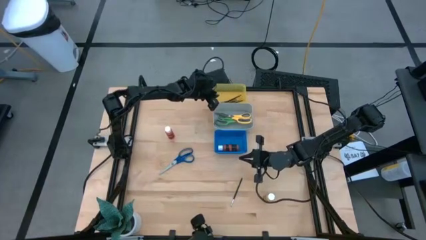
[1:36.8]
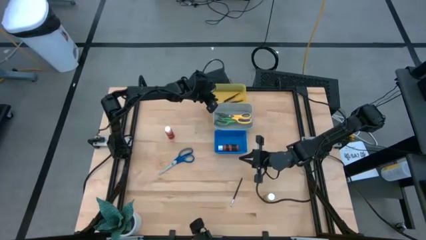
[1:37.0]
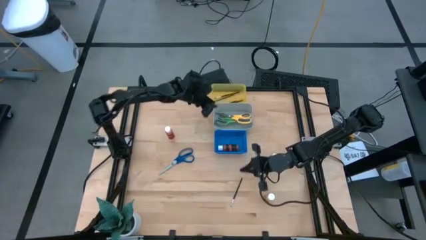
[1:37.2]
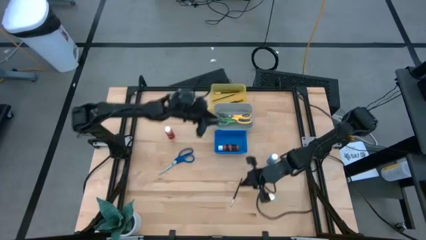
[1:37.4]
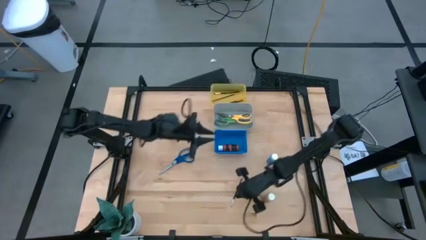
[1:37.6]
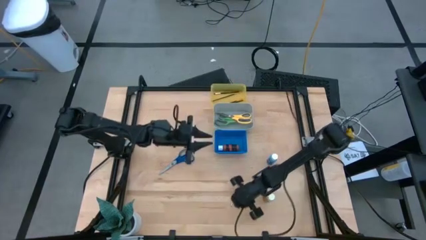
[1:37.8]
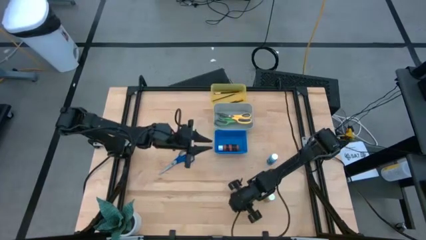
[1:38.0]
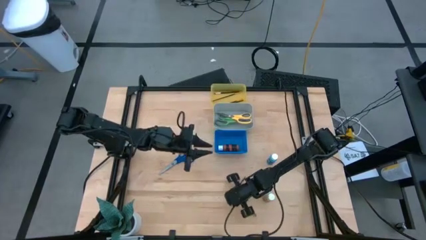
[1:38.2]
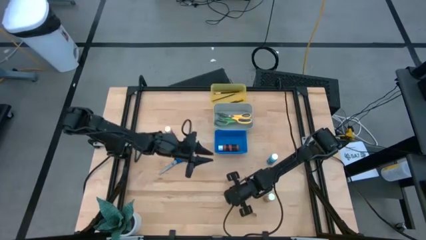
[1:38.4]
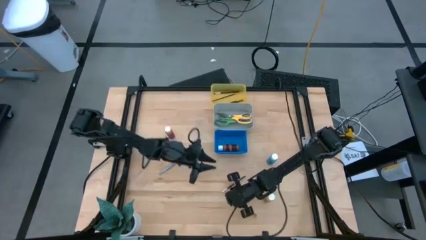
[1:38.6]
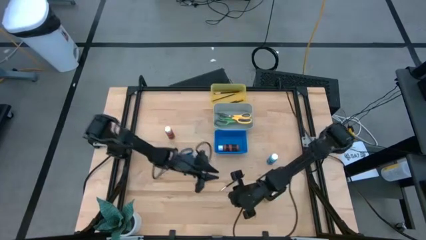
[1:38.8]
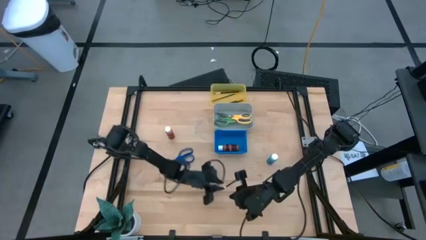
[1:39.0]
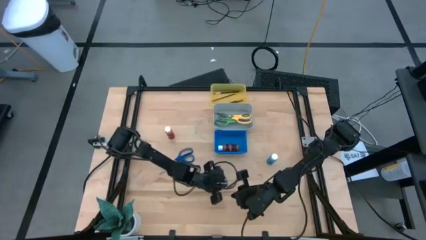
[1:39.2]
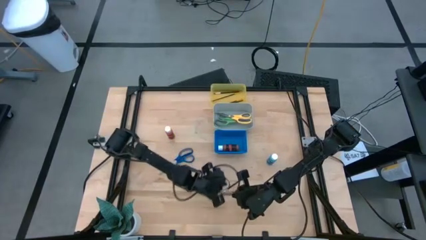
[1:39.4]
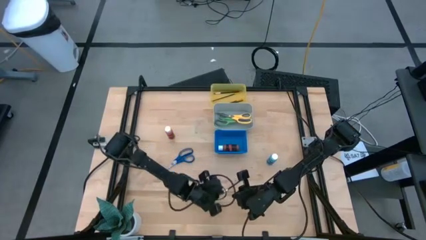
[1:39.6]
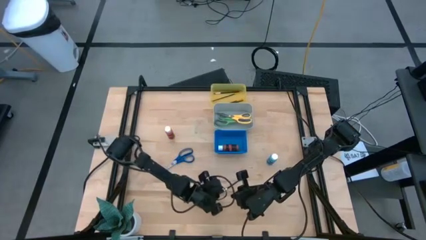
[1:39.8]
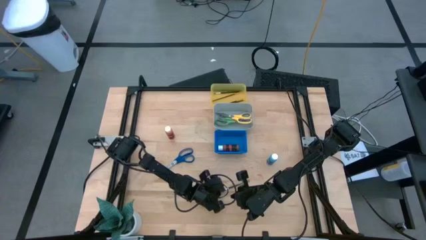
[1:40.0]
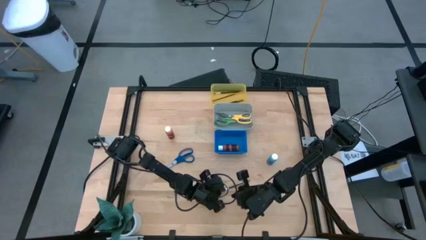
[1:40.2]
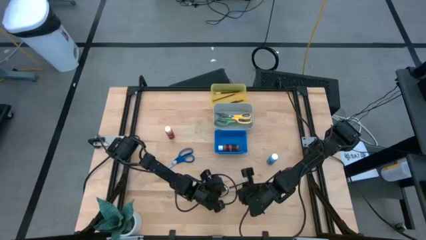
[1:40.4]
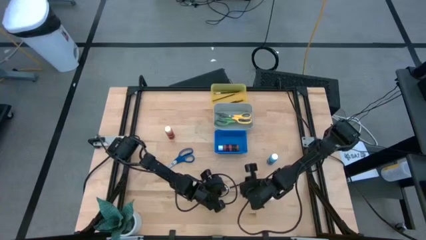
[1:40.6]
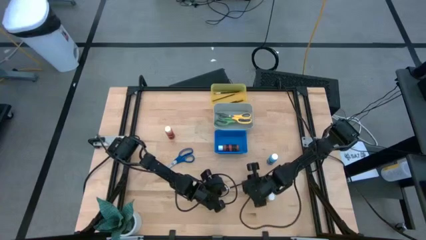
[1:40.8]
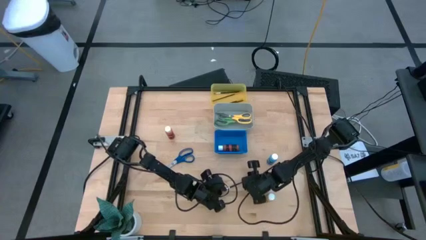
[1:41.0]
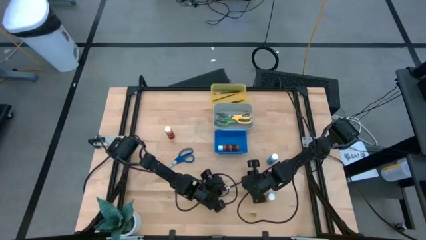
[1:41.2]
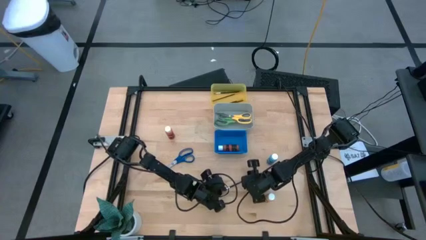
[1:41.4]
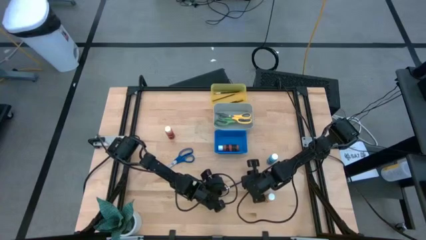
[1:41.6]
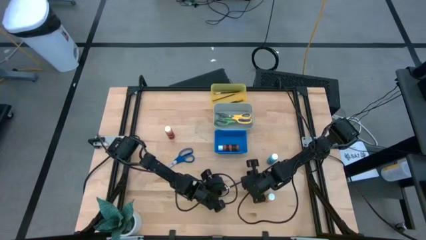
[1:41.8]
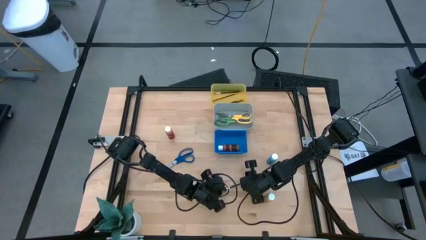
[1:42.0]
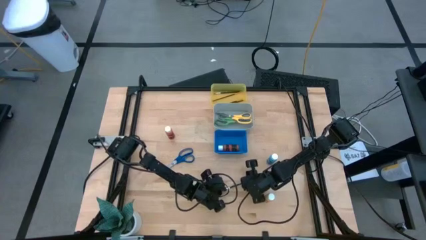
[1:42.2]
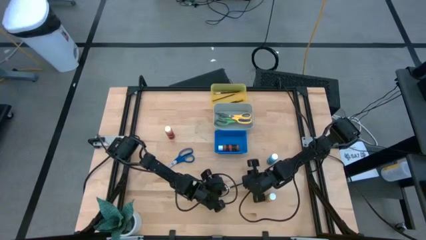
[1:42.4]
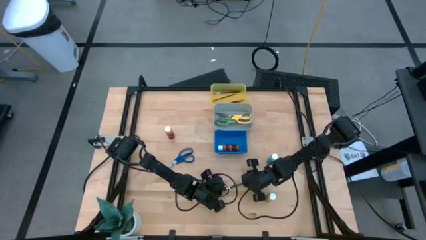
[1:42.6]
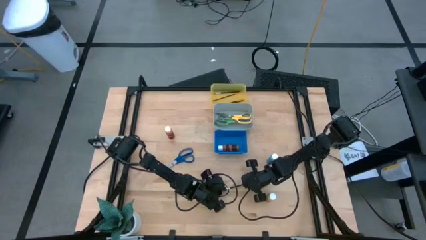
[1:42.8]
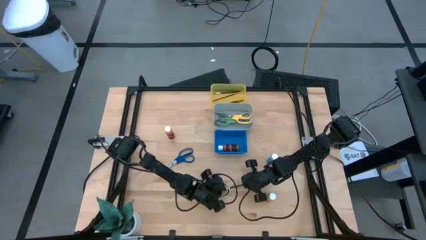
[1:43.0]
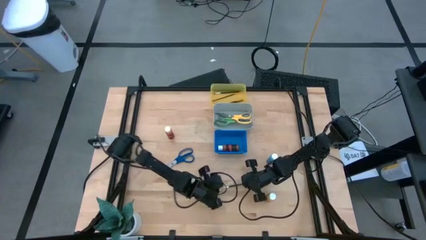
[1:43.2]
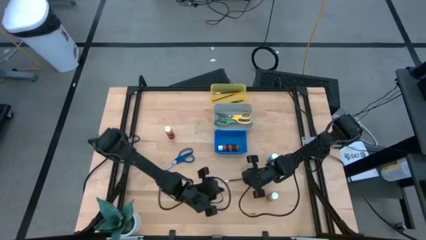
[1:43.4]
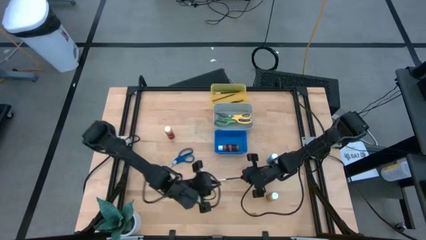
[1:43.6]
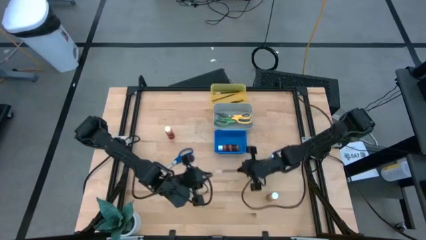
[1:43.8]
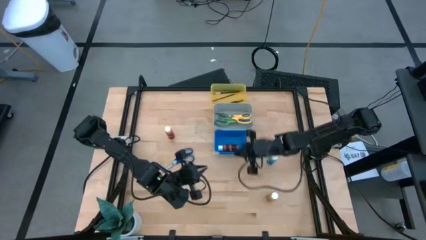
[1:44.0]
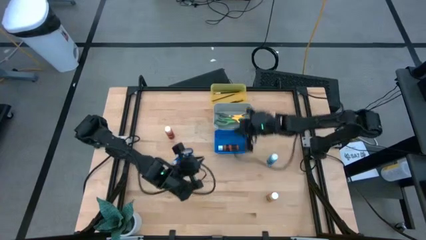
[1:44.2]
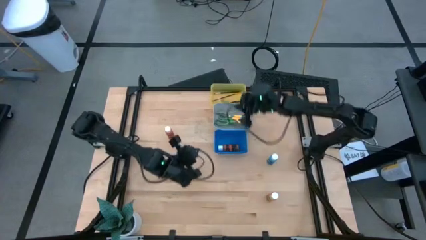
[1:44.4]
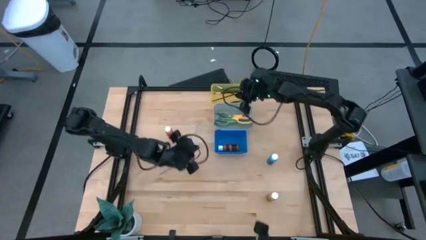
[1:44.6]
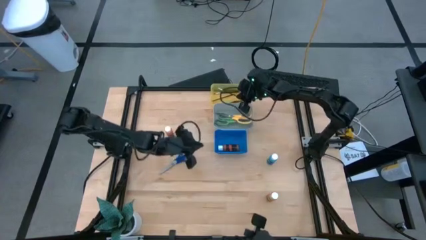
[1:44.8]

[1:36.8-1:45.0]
Task: Pick & Place Paint Supplies
Put the silver paint brush into the yellow bin

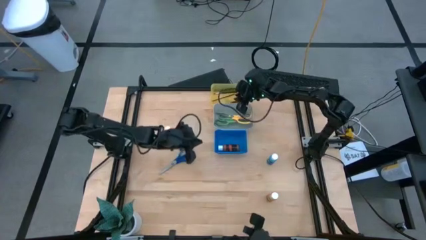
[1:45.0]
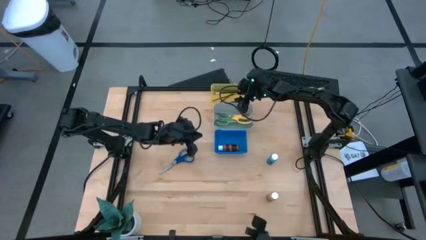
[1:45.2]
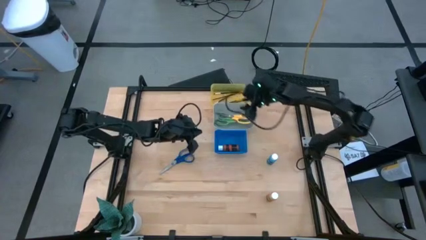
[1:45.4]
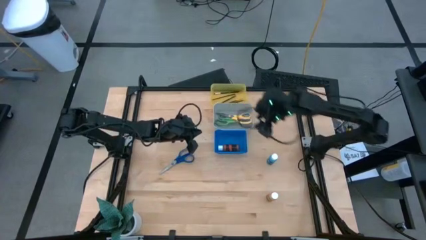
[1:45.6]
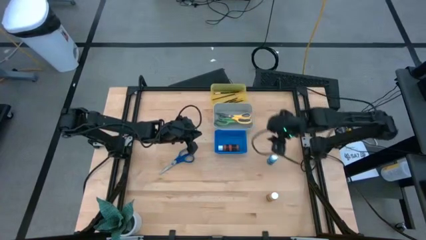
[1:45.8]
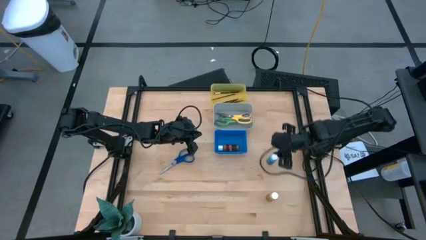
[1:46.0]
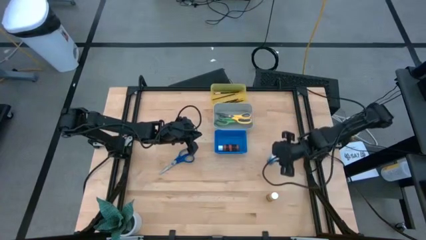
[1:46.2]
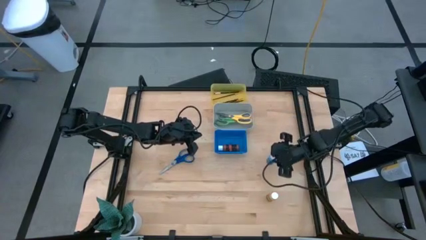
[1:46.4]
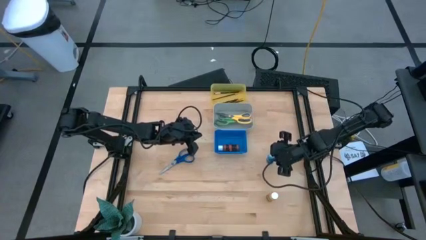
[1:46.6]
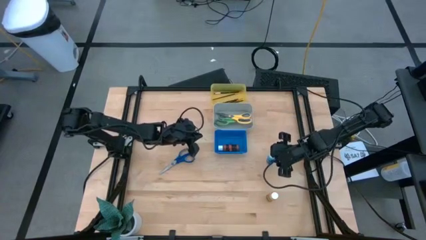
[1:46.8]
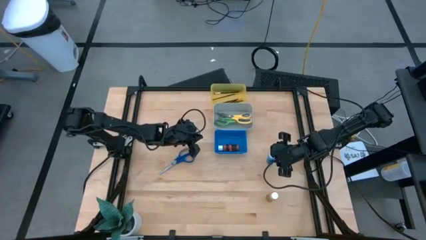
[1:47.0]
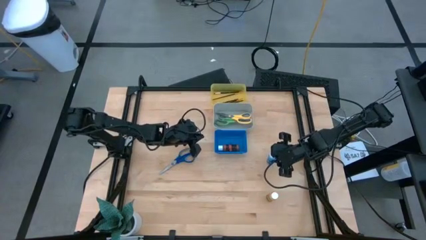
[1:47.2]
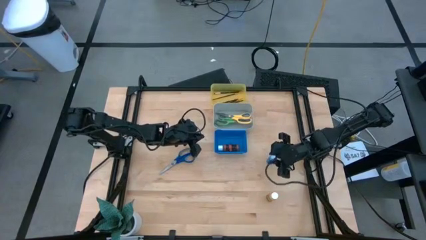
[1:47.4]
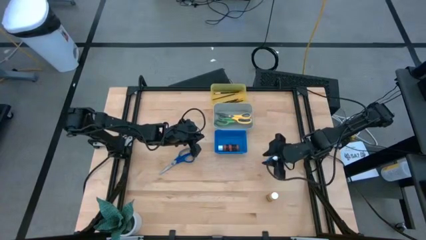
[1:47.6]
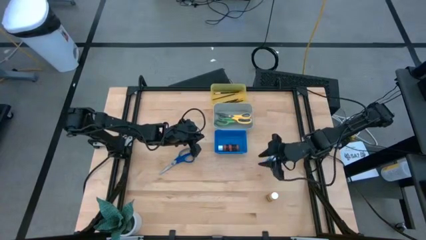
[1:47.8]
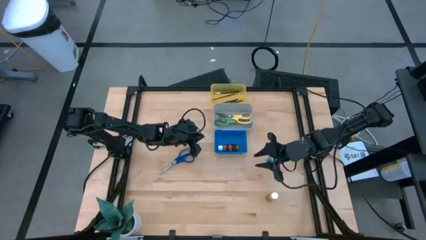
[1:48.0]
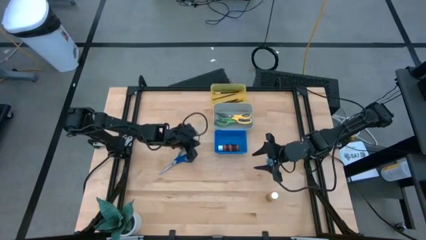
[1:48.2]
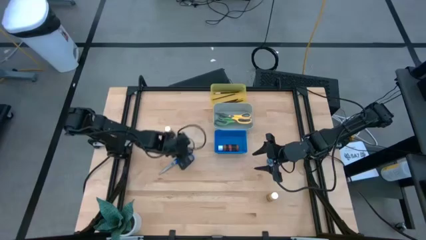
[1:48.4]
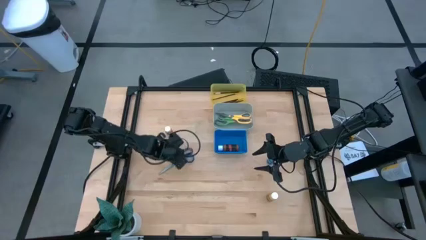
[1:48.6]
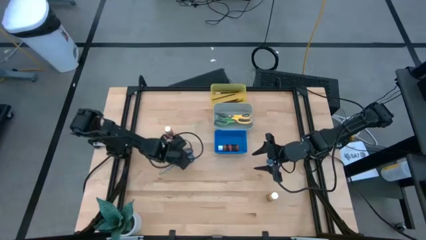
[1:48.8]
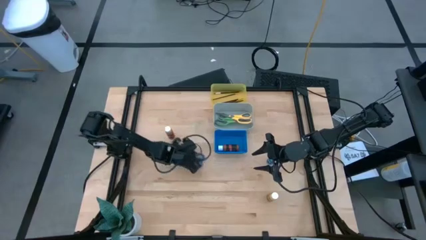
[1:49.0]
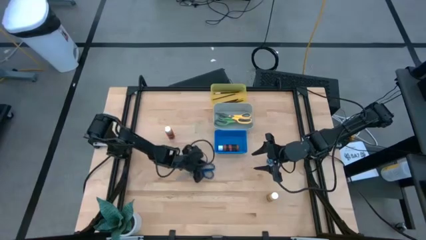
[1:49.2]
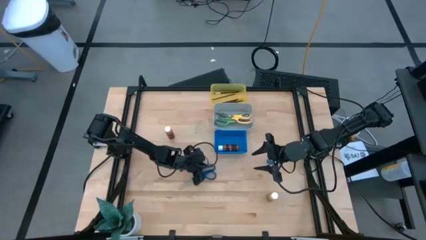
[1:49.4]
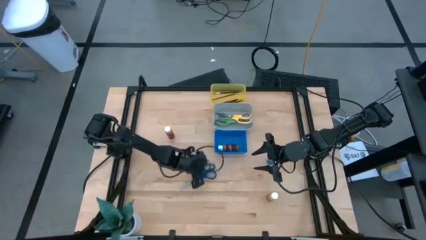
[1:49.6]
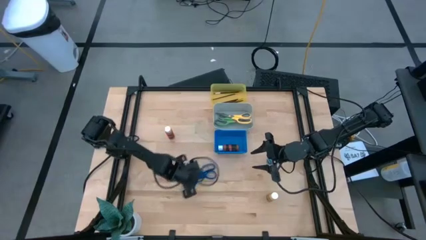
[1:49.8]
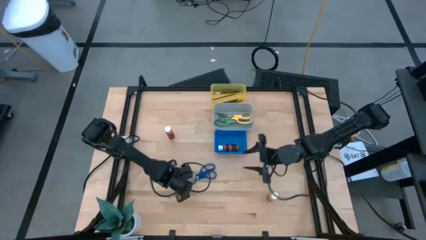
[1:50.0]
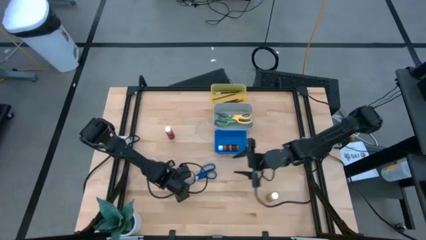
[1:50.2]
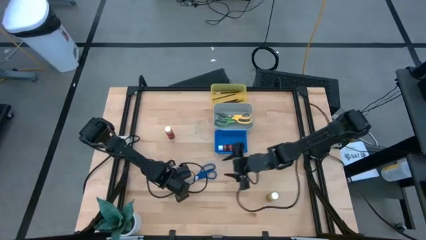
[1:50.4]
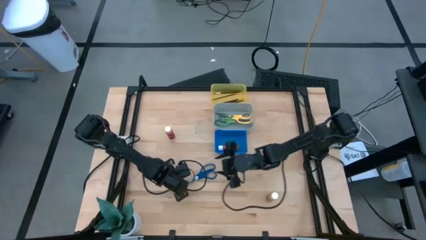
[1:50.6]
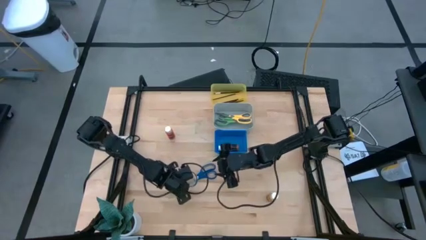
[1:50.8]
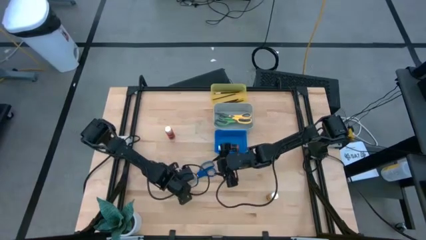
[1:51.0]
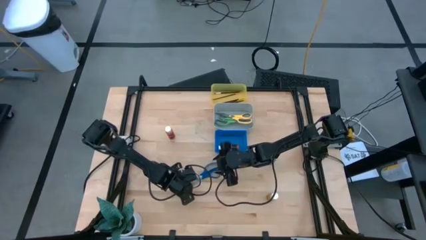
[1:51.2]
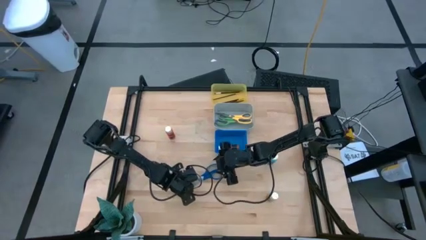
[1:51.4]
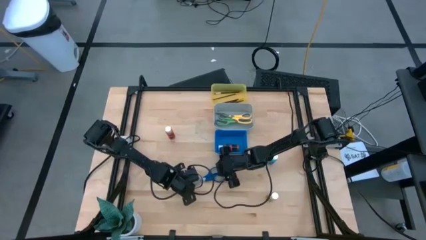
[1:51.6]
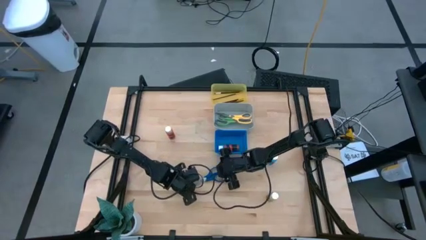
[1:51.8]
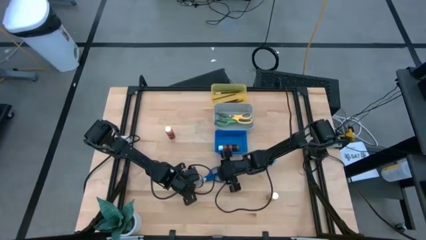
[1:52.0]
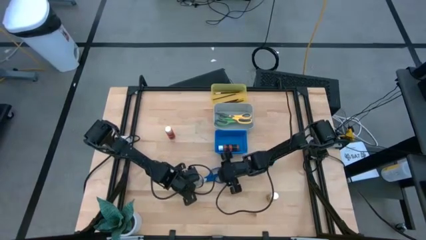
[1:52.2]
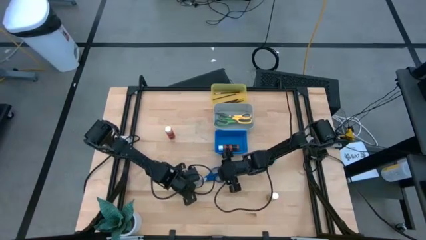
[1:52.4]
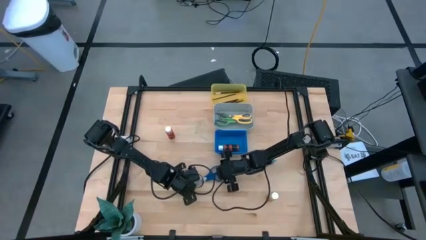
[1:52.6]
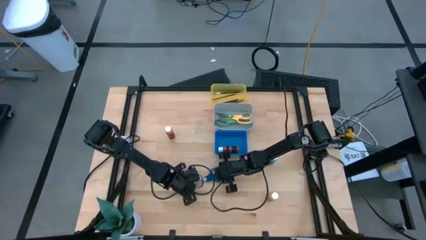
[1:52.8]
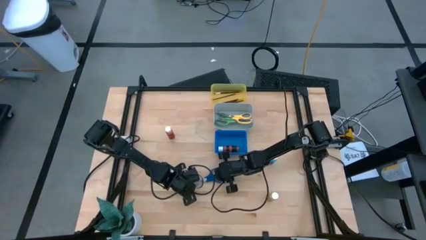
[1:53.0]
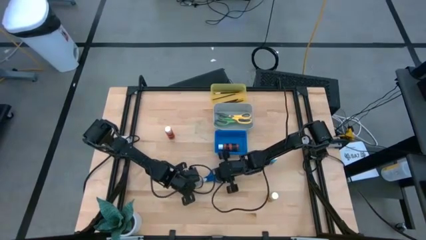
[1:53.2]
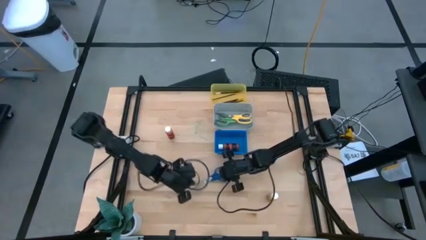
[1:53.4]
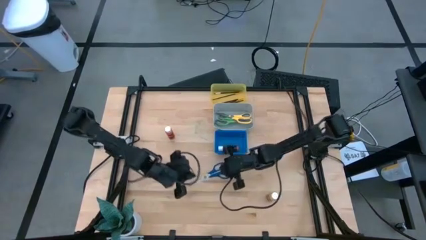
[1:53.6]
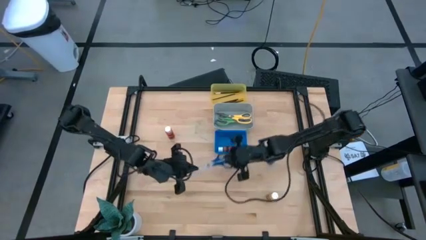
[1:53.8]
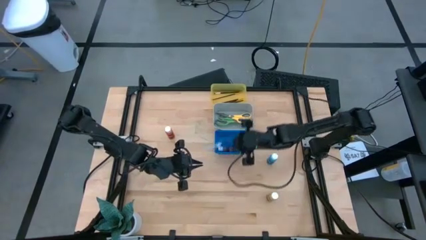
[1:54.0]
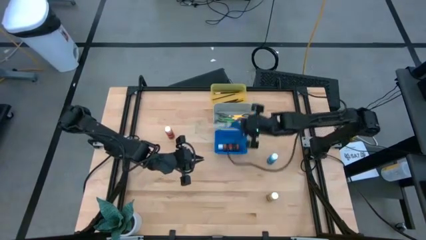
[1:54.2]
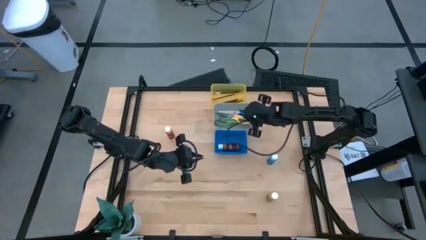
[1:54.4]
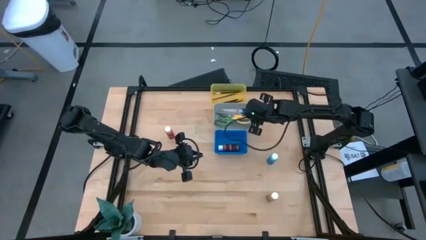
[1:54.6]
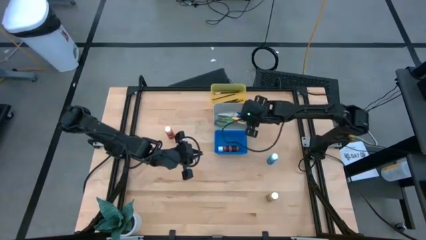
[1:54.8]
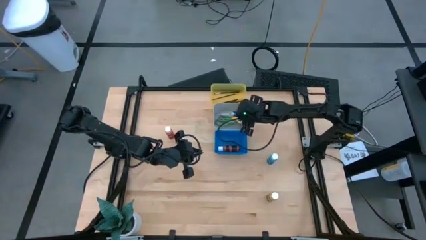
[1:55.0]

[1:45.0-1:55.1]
Put the blue scissors into the gray bin
